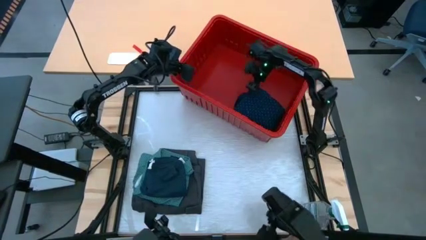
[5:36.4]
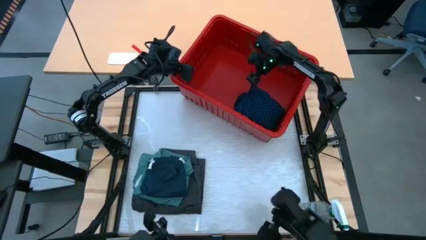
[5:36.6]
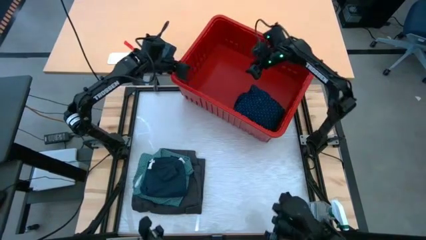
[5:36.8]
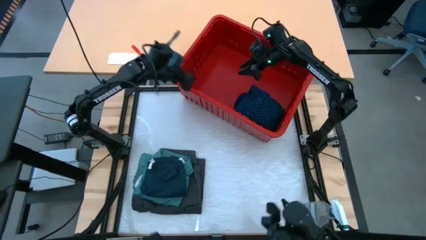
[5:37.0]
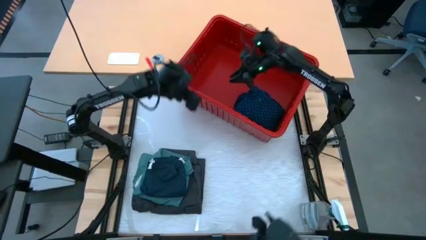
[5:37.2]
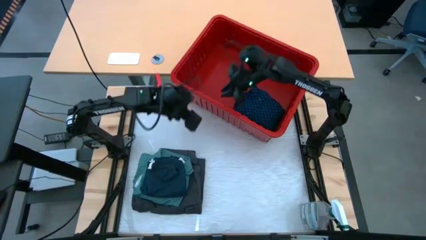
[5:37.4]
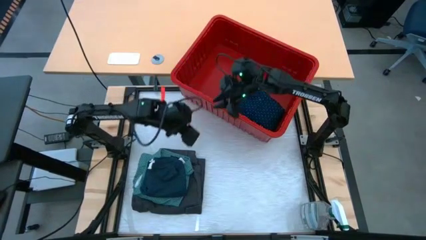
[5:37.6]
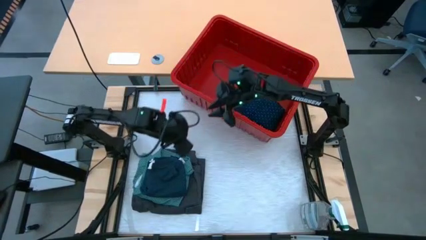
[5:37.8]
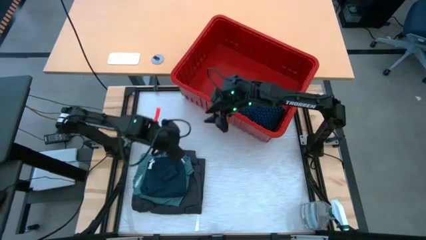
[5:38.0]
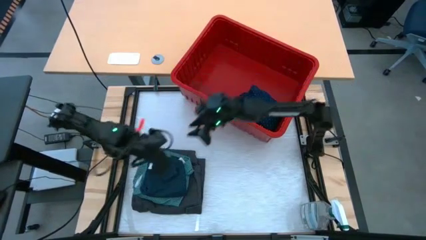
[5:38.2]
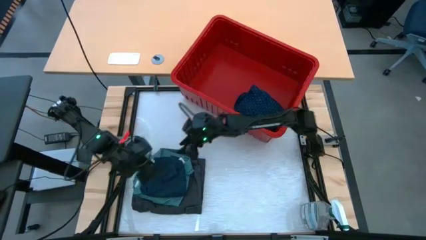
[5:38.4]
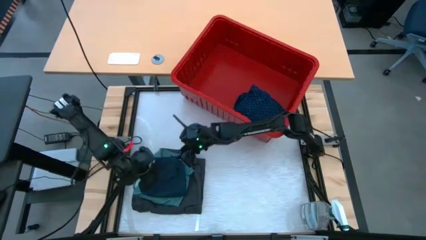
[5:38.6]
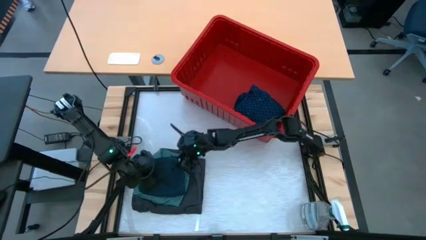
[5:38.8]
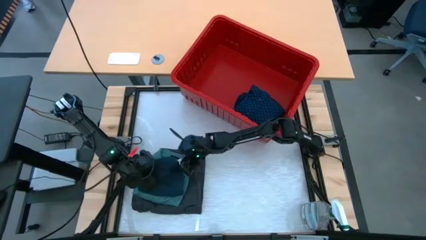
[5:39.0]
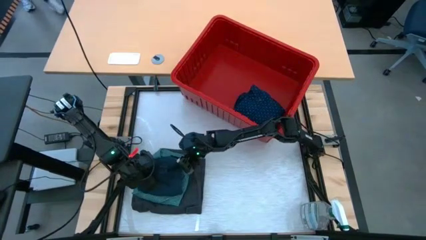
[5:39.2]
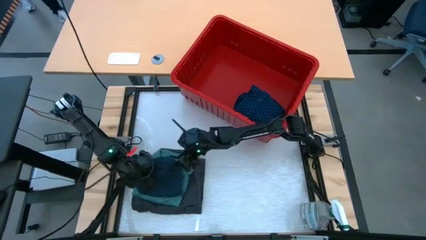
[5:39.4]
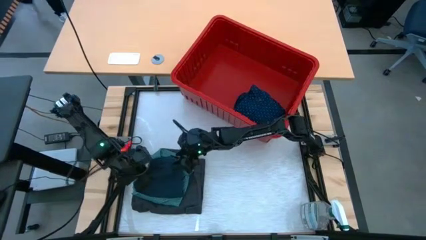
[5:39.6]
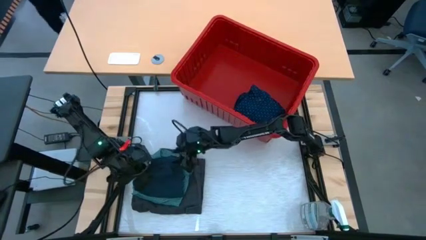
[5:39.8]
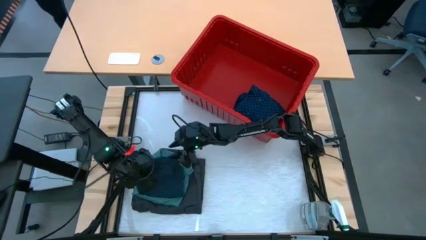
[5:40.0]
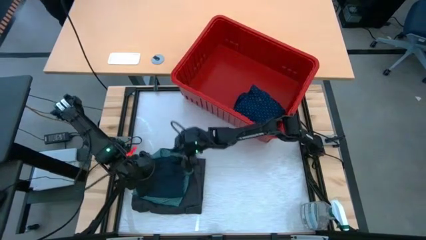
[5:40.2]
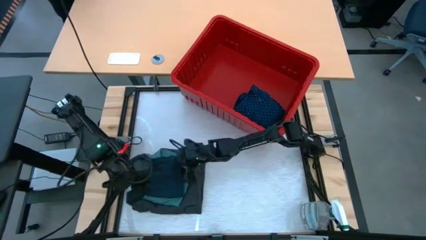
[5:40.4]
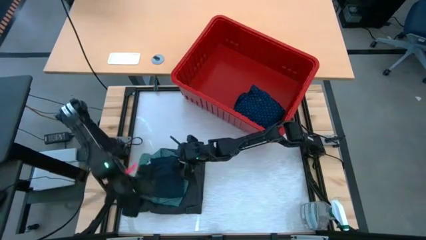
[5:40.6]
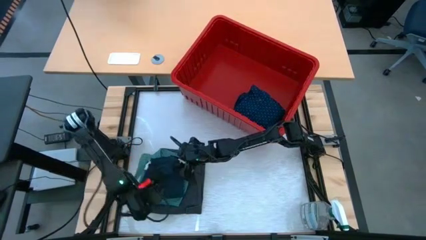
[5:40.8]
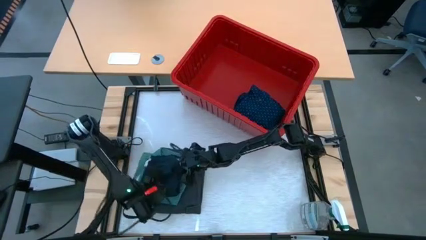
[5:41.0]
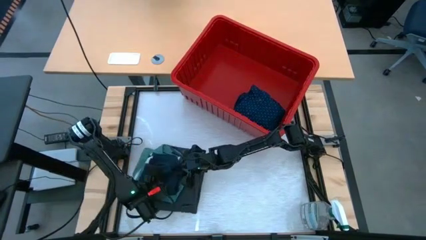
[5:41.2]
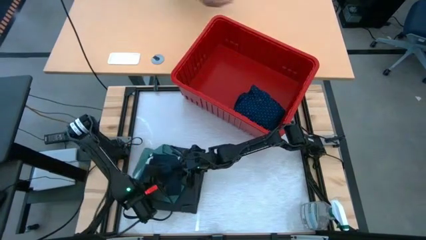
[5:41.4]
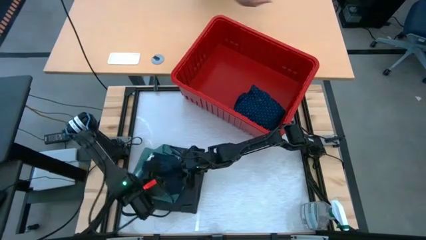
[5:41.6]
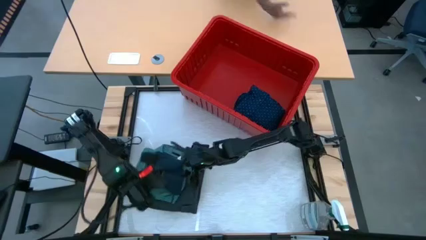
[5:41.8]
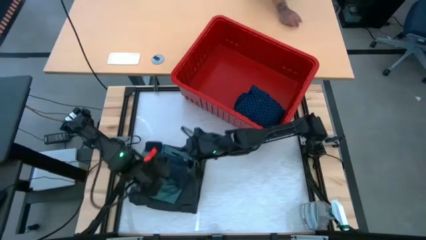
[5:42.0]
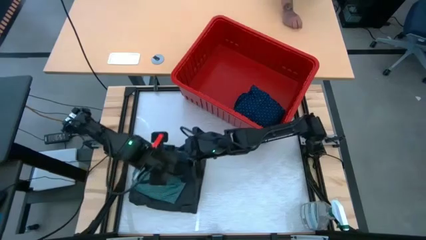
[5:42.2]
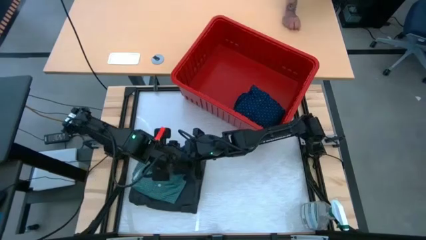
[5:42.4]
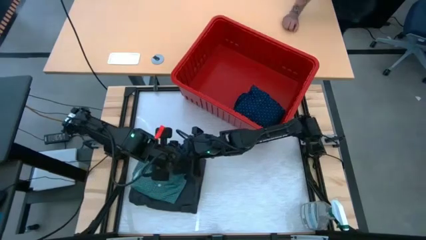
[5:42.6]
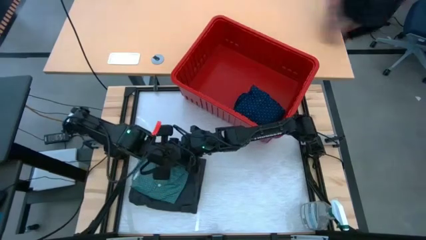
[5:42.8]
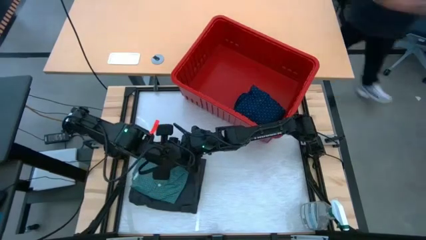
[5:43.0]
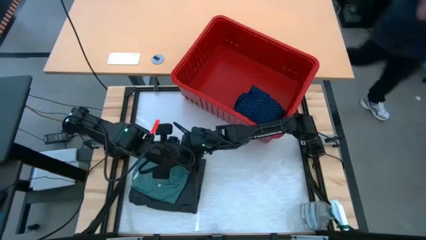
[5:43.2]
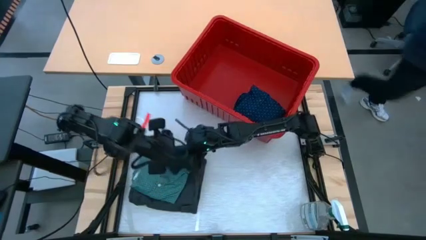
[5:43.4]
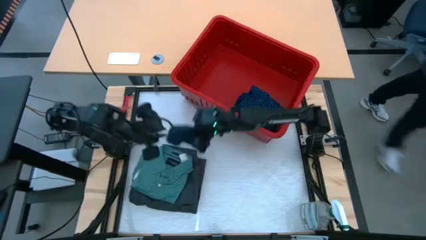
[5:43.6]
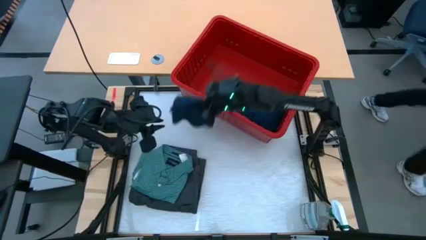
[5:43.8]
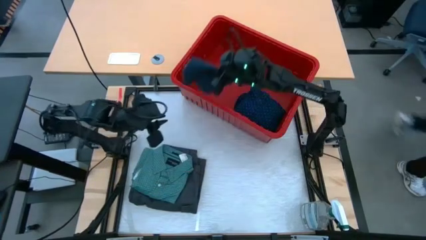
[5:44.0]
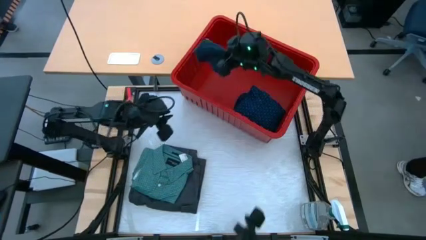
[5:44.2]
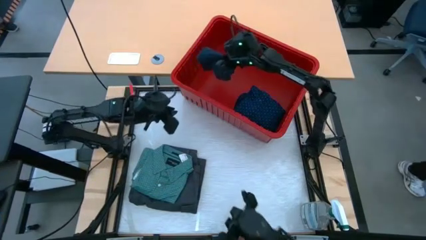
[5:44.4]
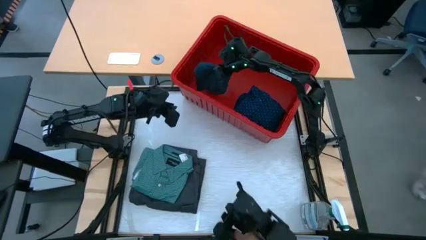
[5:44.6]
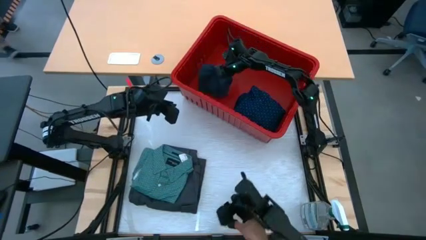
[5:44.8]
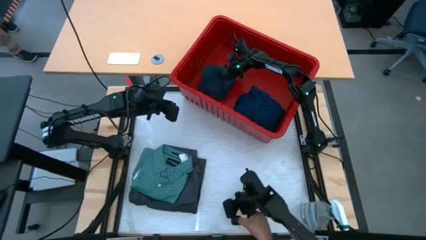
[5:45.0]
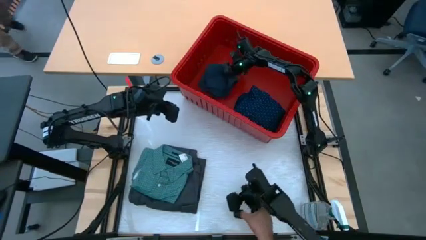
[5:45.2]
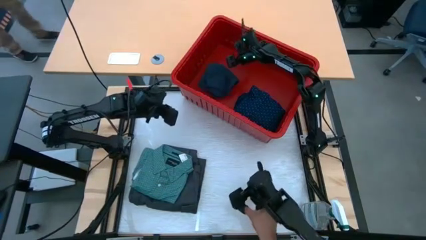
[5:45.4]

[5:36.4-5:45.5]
Task: Fold laundry
Put the dark blue shorts into the red bin

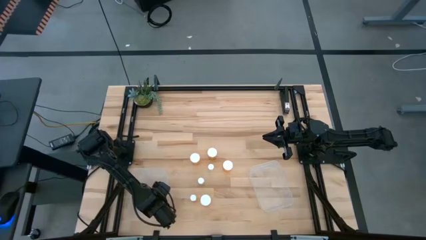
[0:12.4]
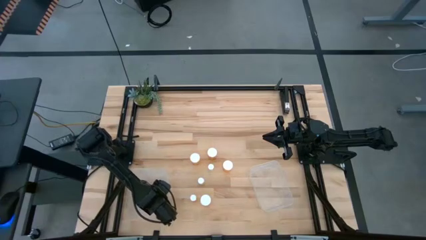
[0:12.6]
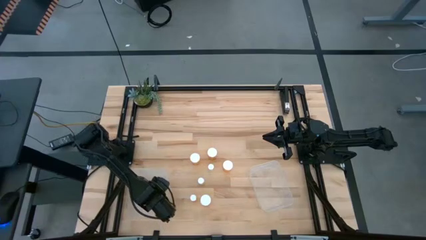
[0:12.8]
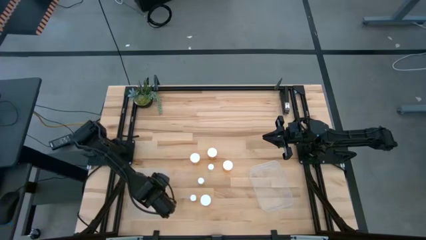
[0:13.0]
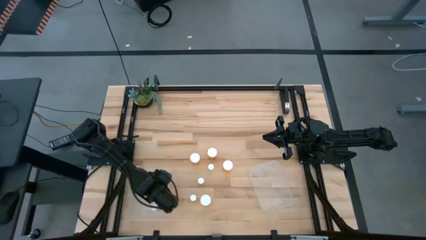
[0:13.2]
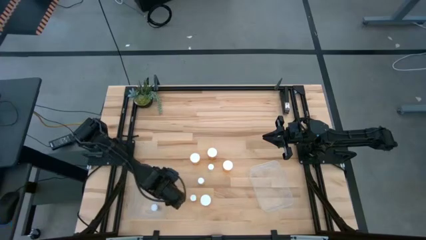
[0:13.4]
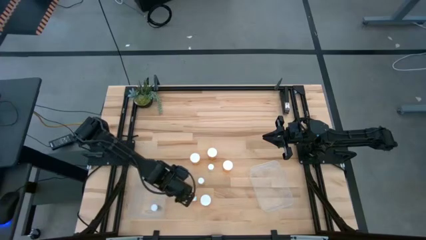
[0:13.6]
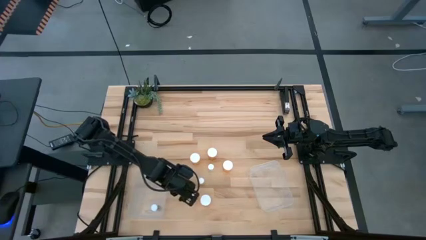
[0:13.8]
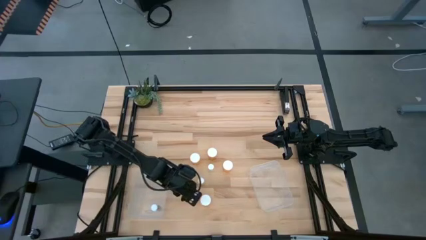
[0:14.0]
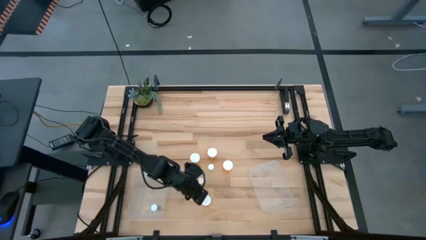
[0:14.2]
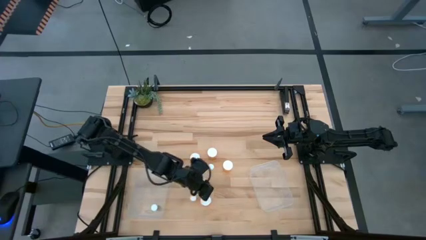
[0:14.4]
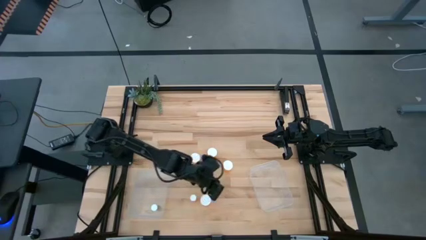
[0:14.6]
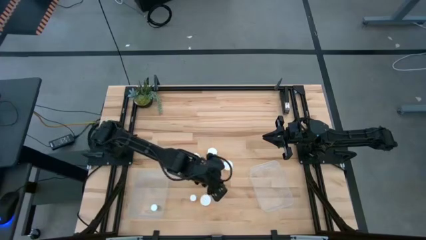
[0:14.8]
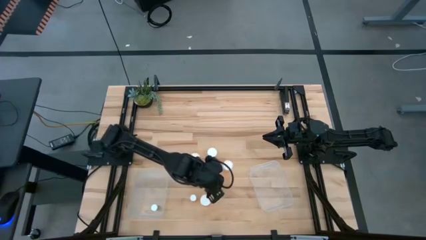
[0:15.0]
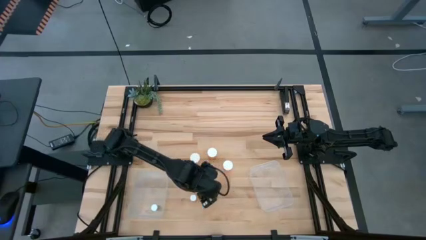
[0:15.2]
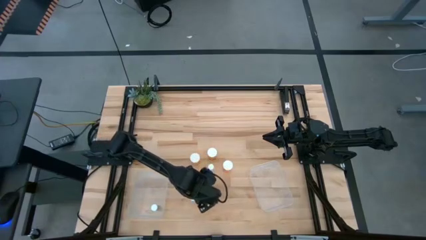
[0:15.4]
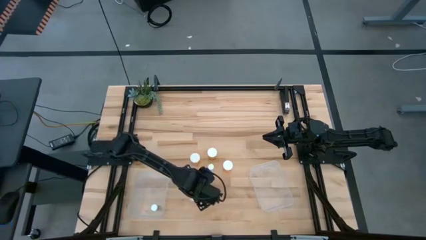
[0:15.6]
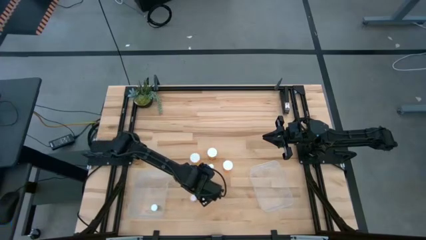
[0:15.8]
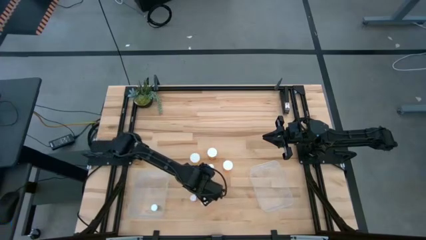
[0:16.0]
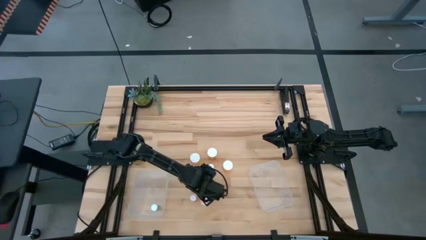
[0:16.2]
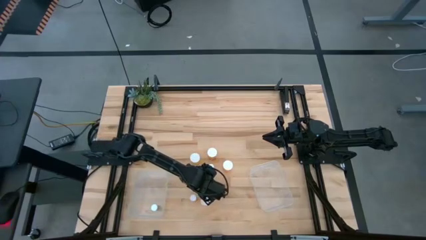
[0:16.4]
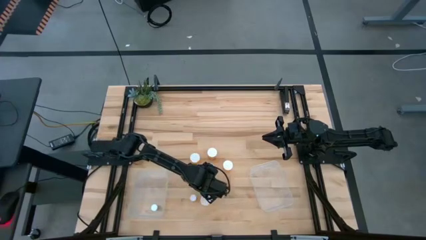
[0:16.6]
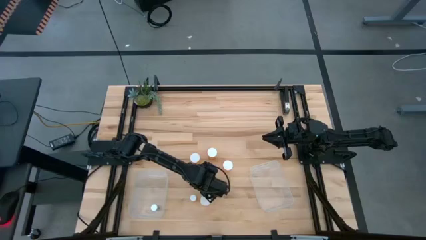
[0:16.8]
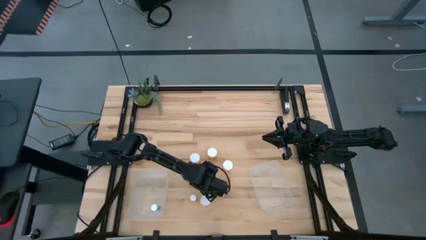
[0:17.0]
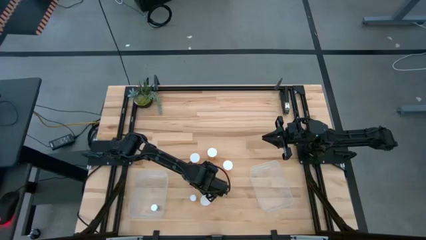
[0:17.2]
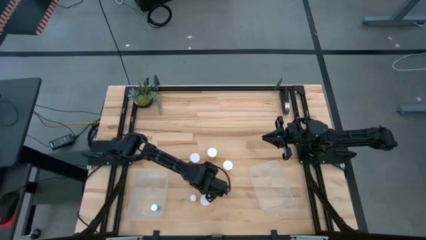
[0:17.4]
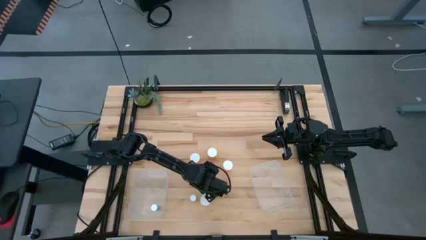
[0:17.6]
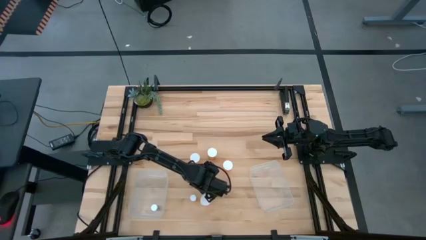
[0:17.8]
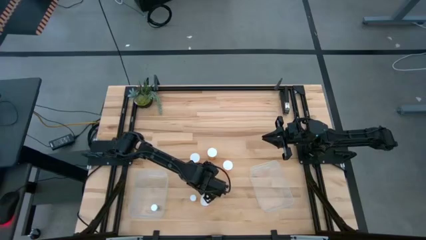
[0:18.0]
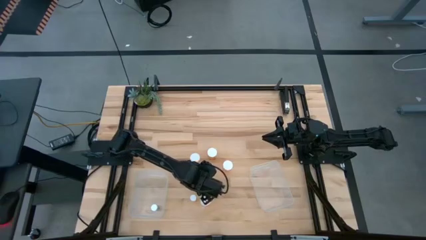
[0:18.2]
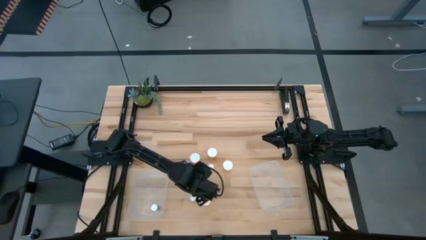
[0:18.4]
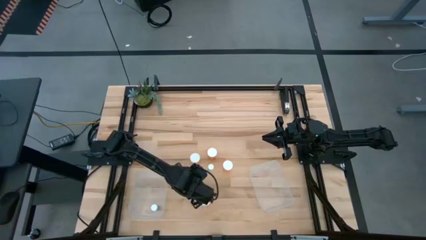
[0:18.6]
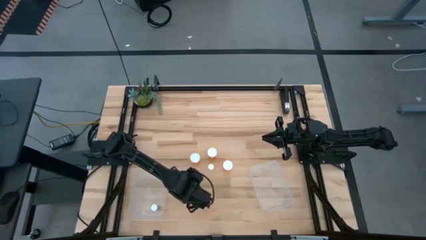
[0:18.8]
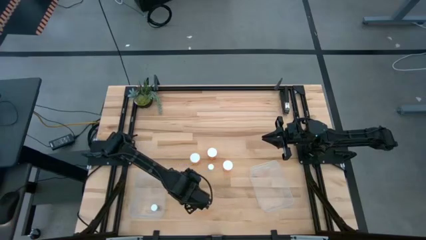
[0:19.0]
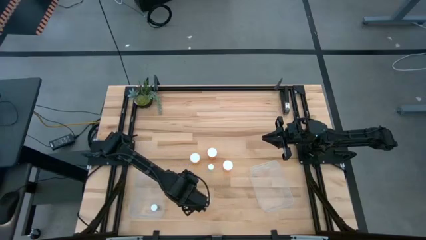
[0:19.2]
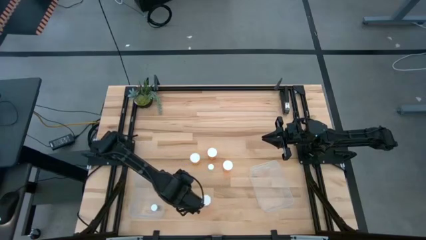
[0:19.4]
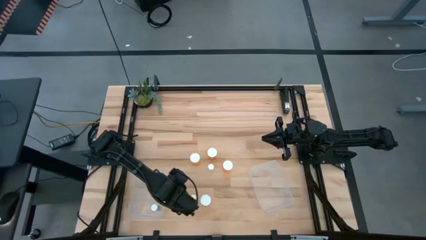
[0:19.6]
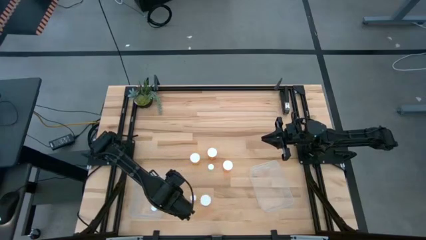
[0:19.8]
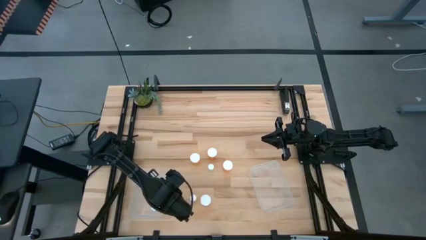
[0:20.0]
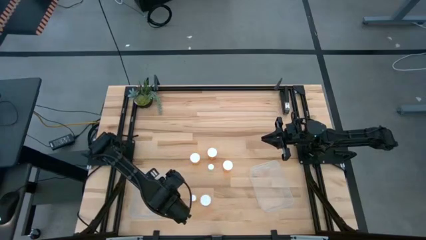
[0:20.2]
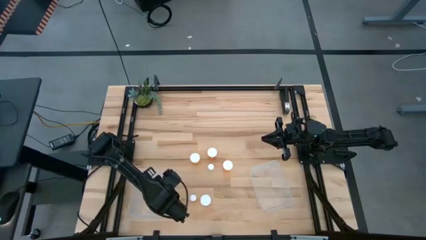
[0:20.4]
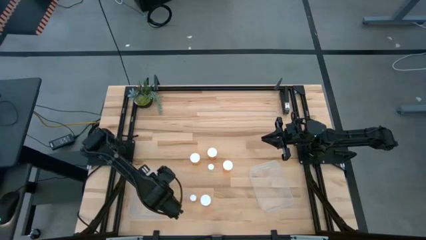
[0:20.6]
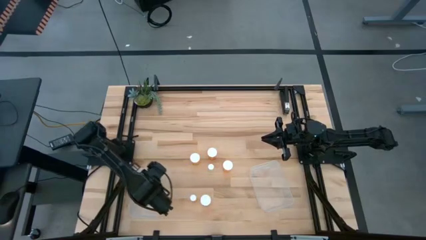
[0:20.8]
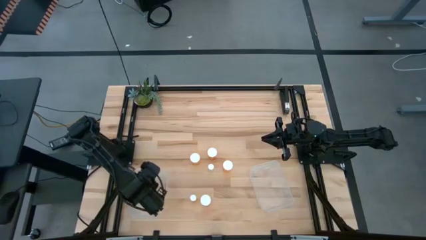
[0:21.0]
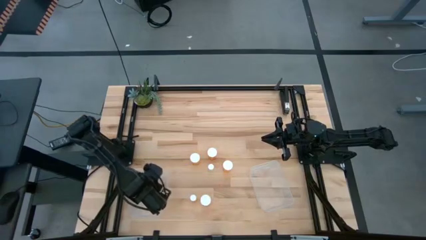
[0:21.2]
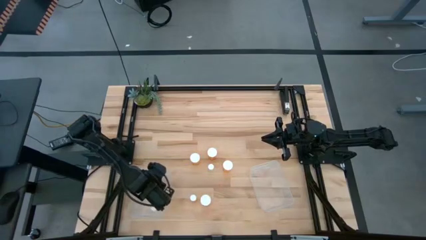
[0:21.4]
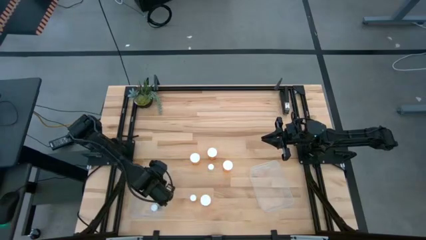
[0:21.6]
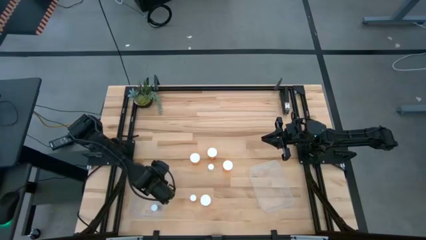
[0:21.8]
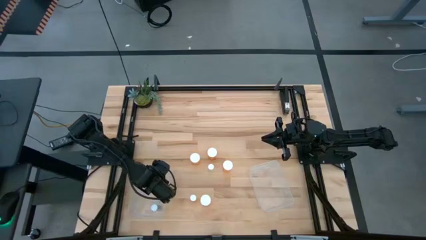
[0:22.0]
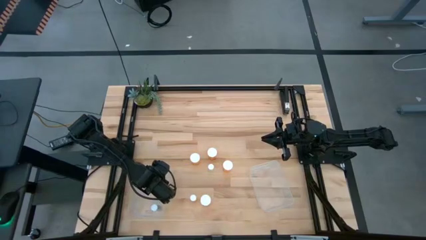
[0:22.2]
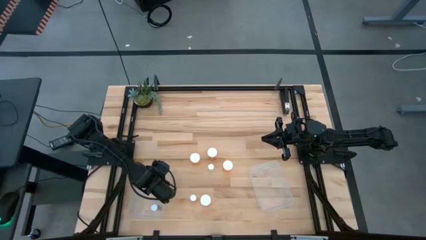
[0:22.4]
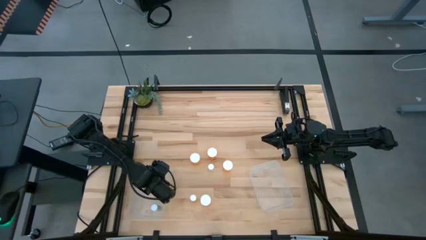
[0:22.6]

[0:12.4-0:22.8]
Task: Pick and place medicine bottles into bin by pill shape (circle, oval)
Put the small yellow pill bottle into the left transparent bin
